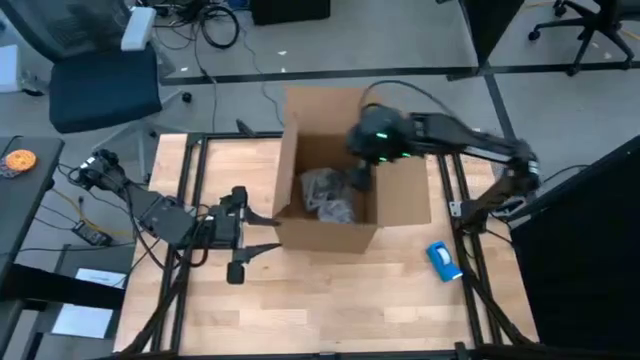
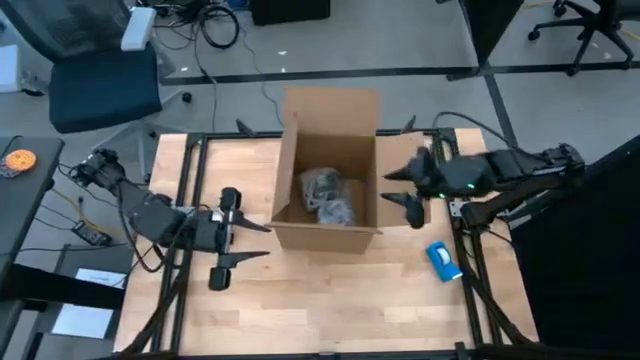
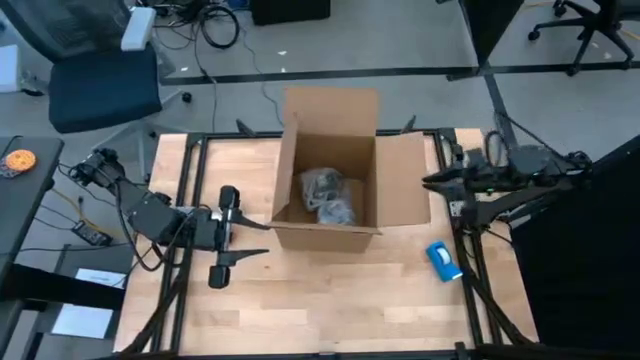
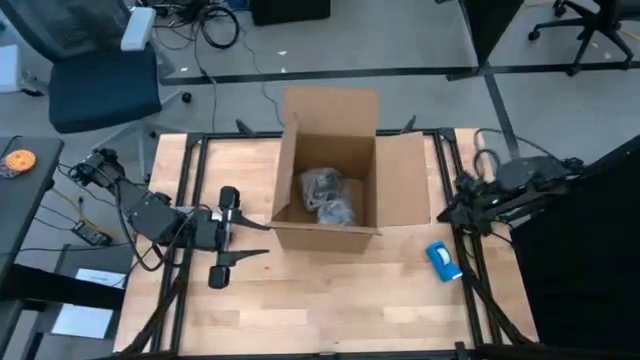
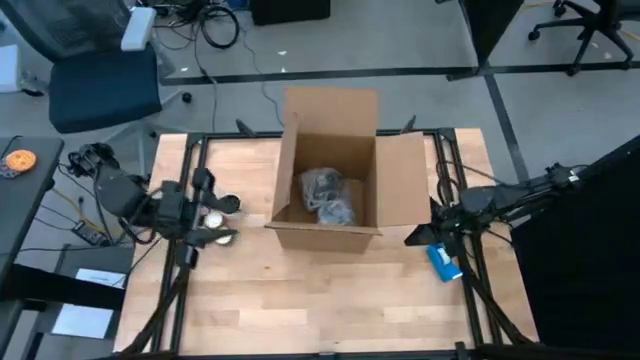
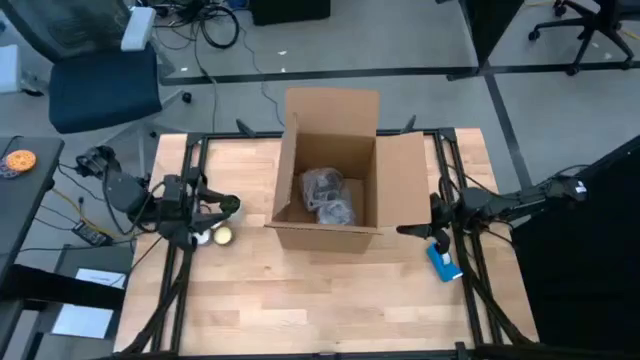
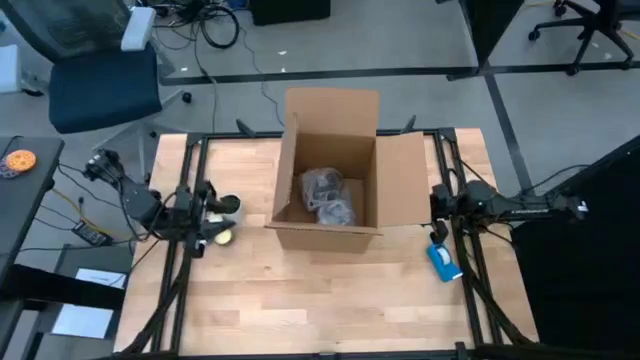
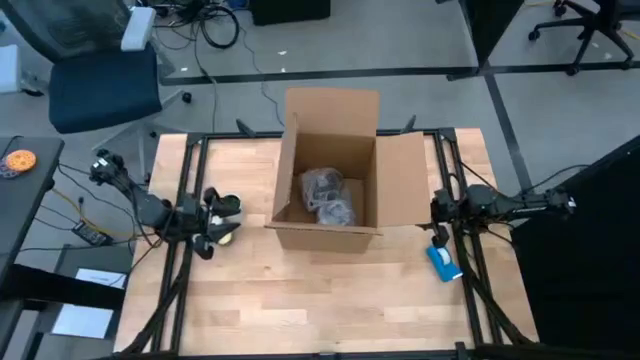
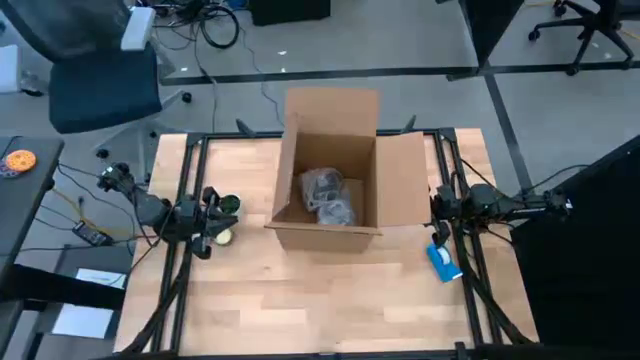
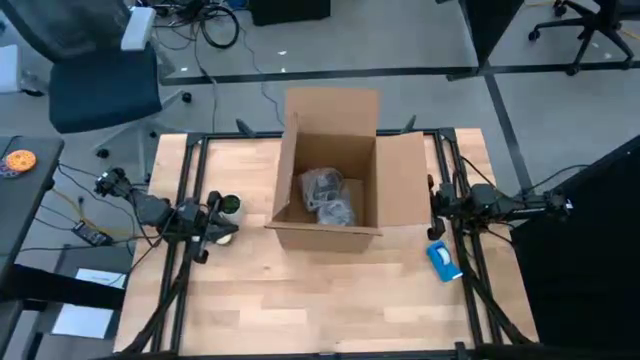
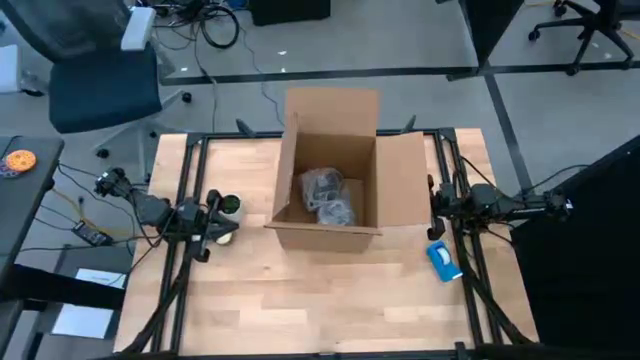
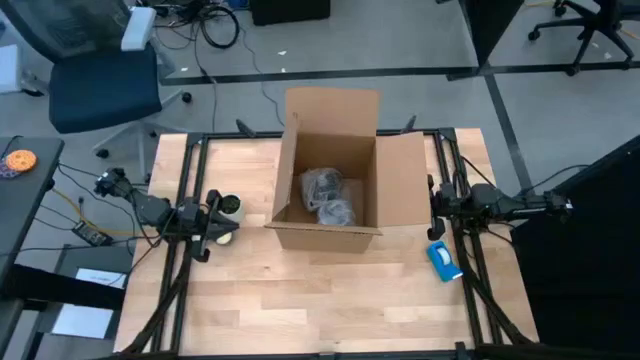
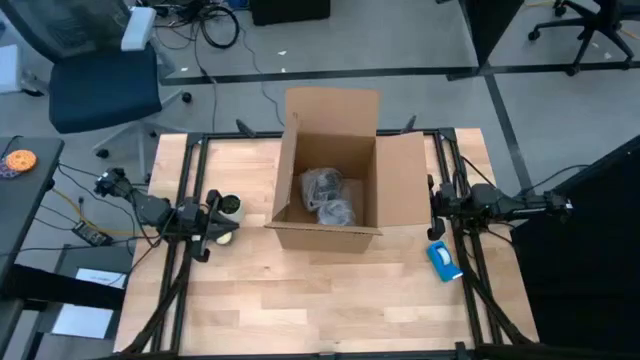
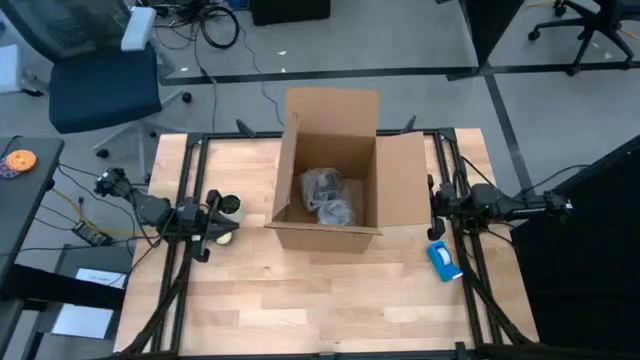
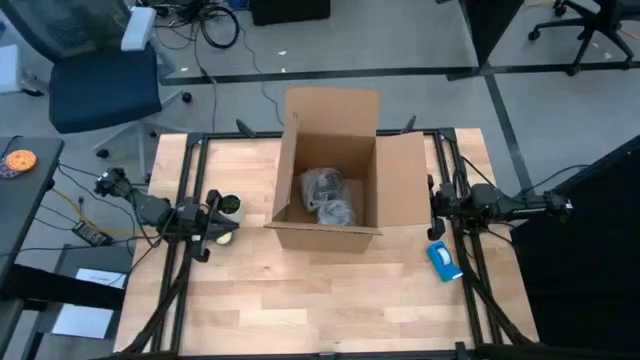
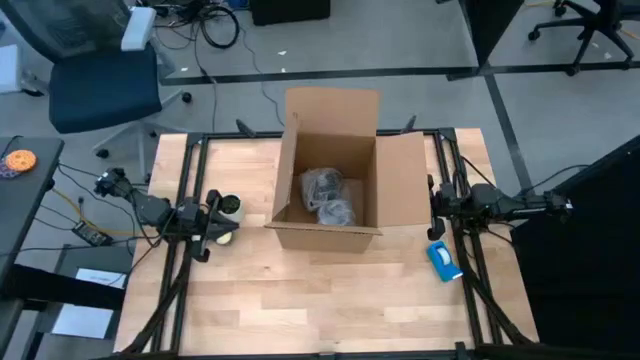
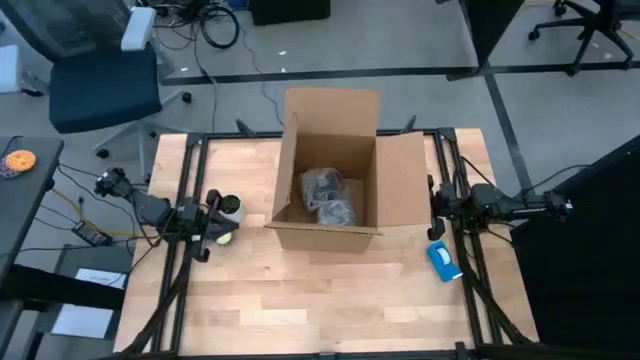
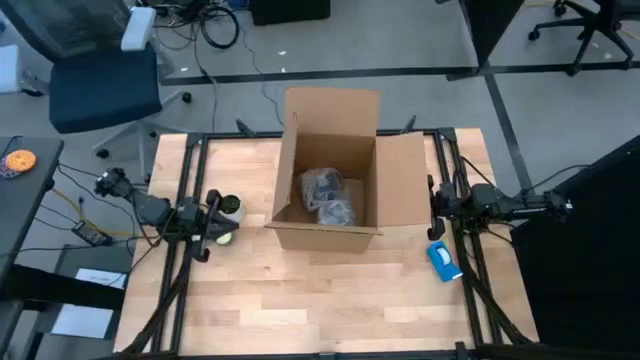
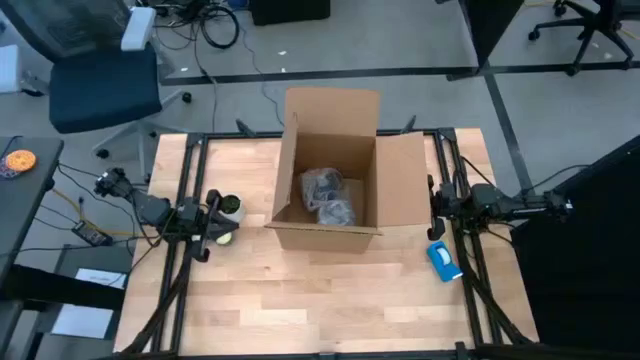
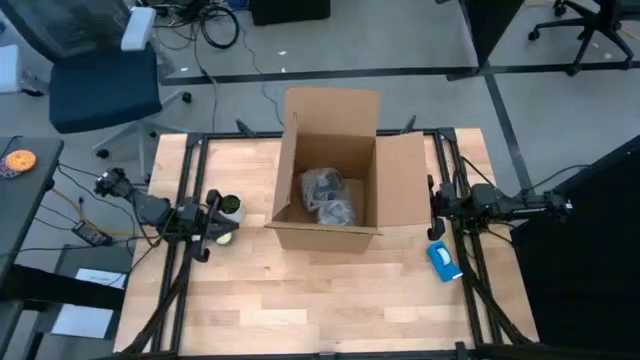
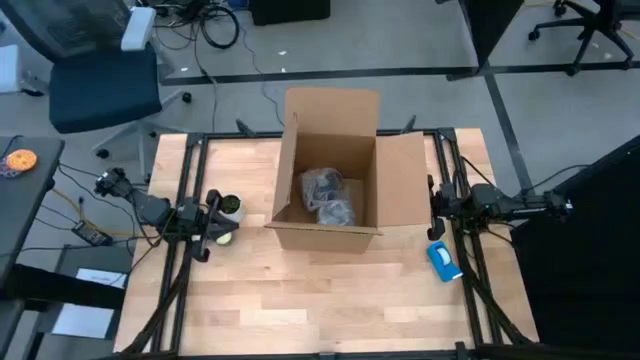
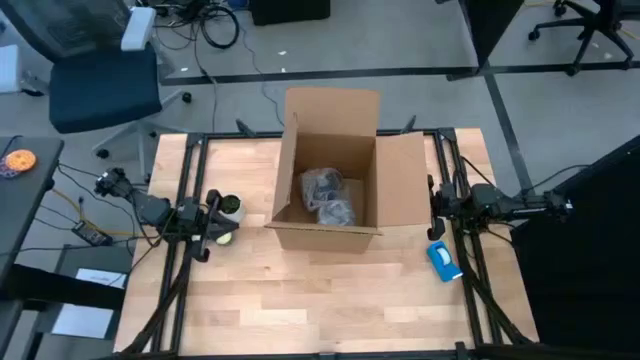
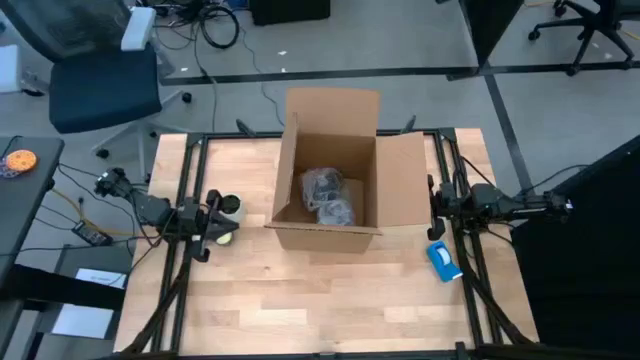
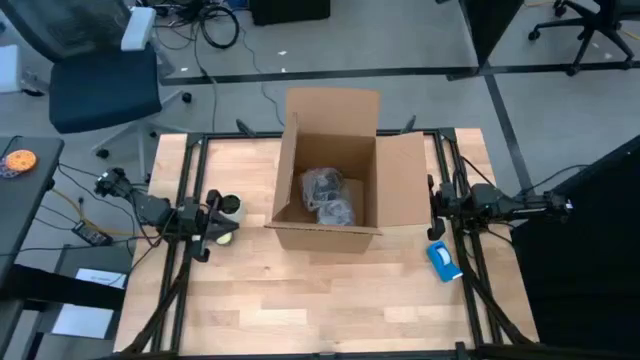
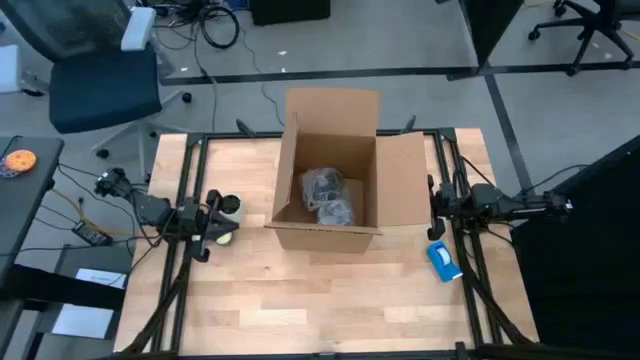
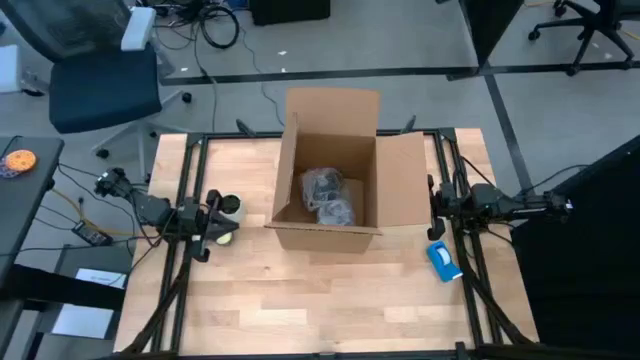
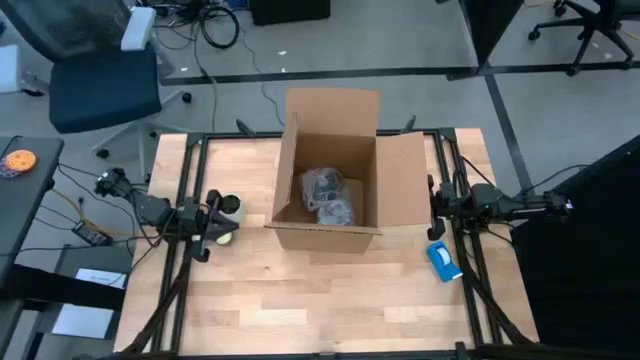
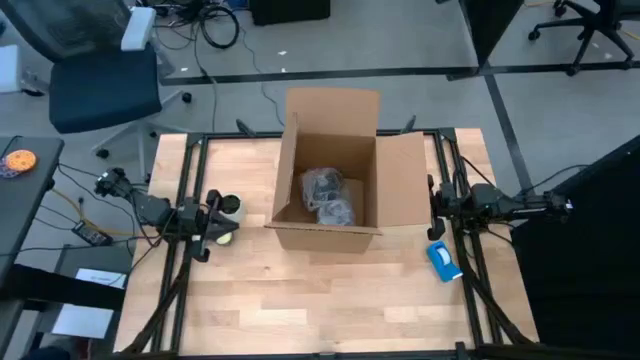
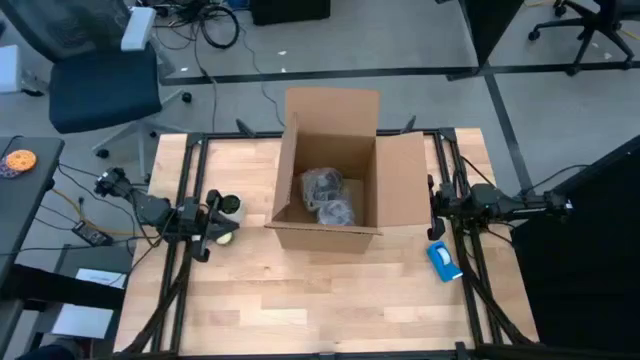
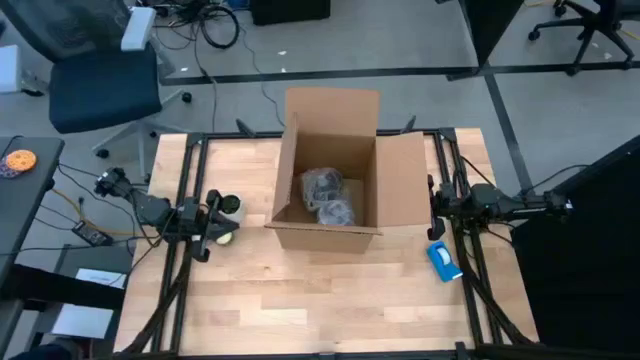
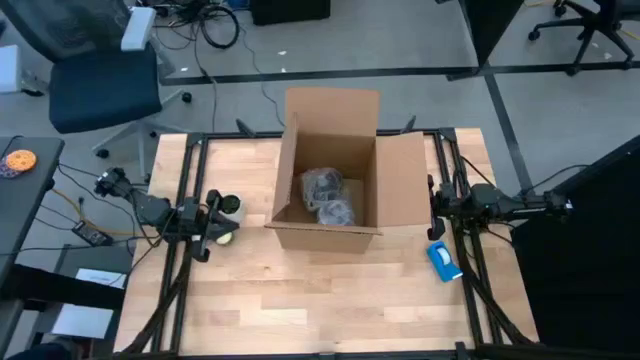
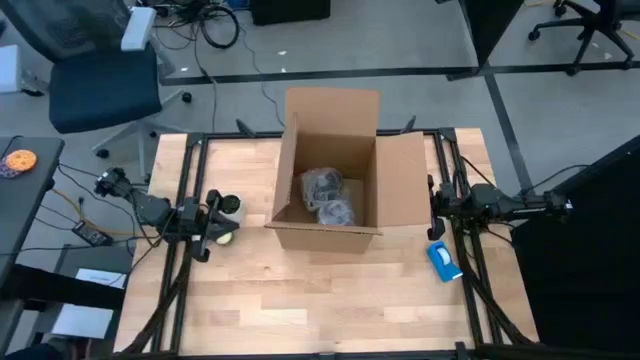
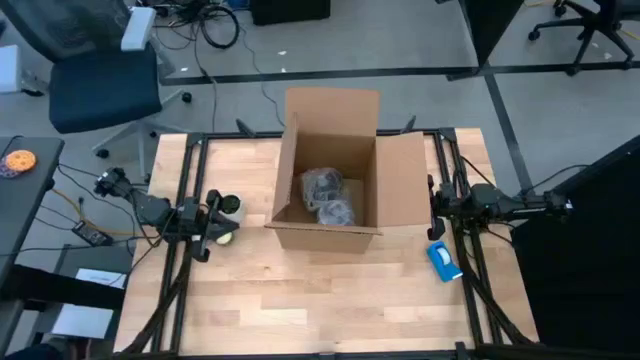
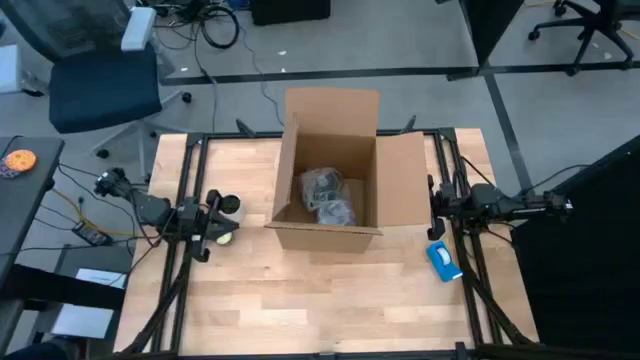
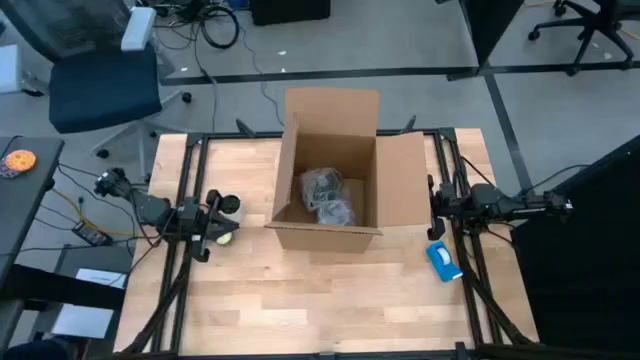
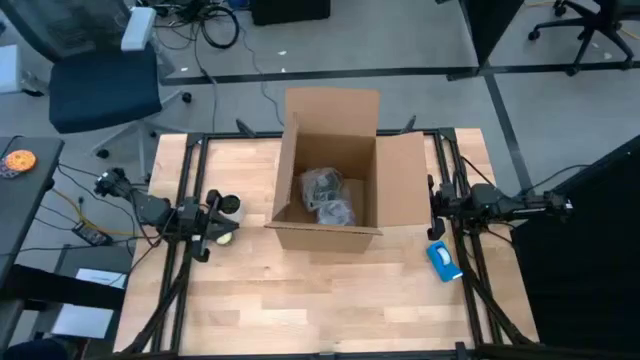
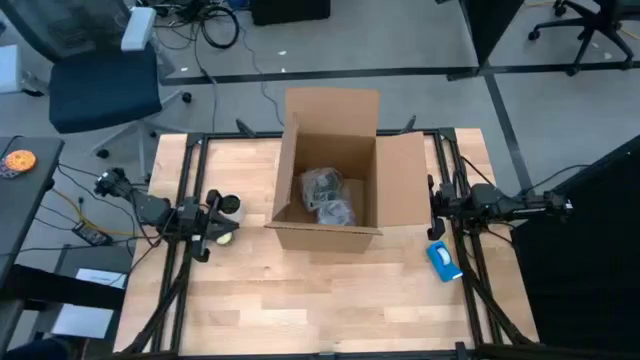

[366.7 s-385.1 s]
Task: wrap mug
Return to Home Position

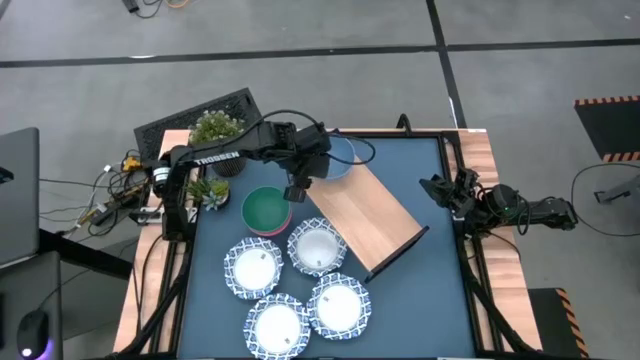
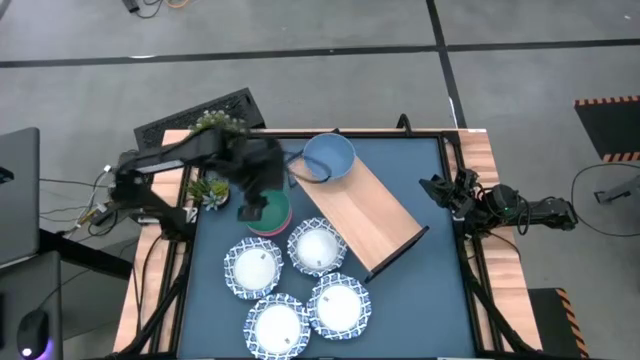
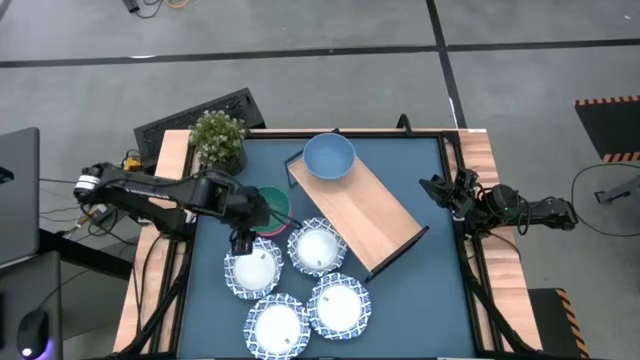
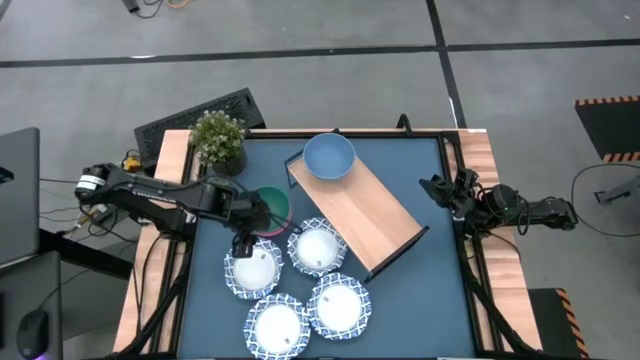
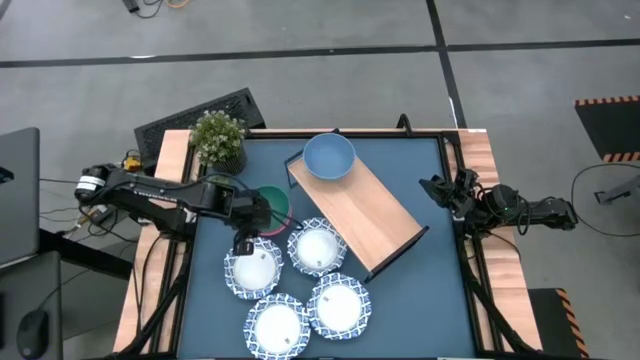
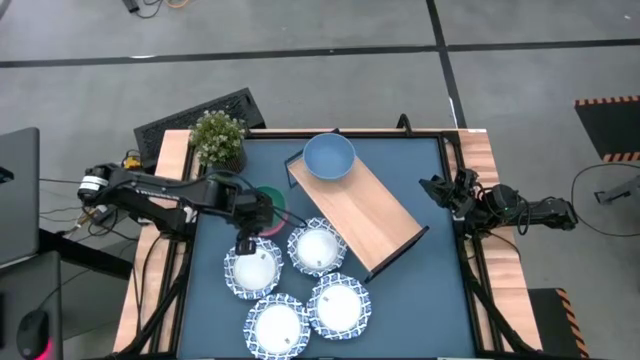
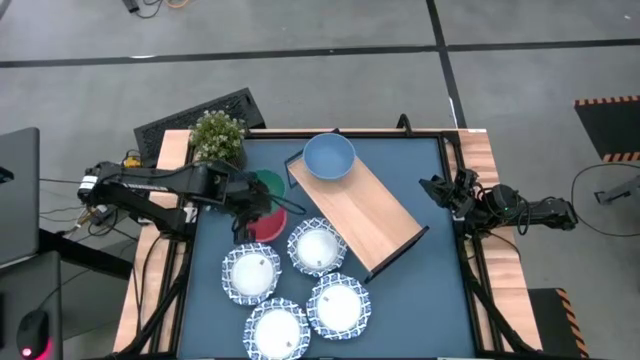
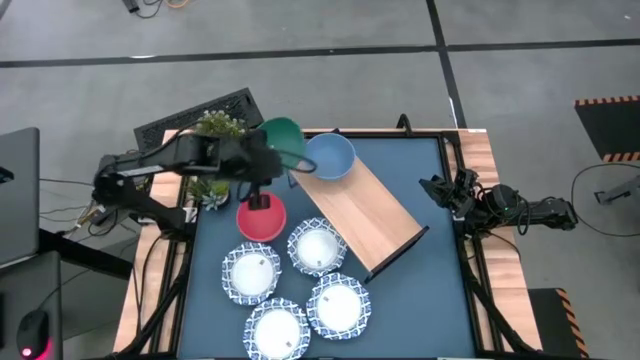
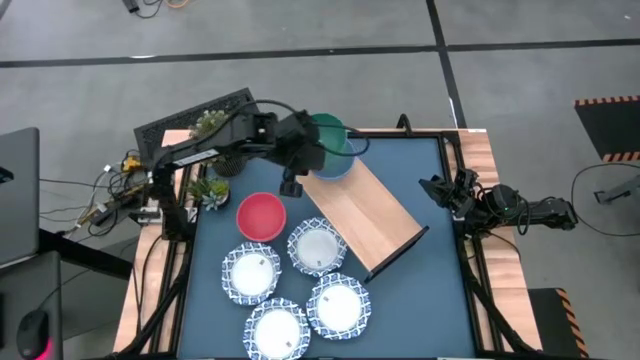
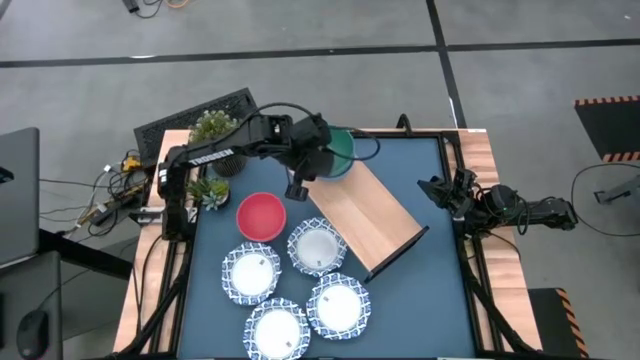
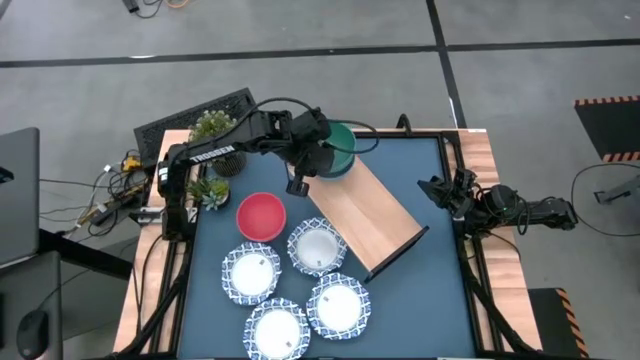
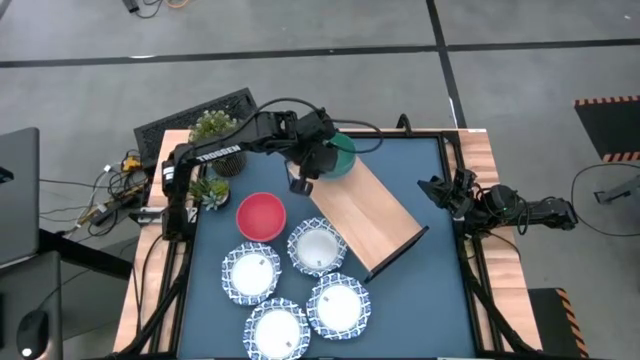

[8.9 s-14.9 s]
Task: Place and stack plates onto a shelf
Stack the green bowl on top of the blue bowl on the shelf
